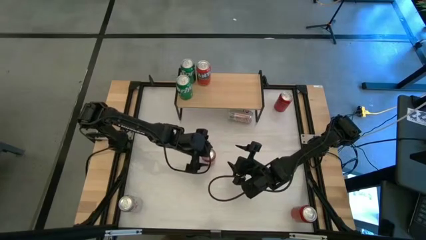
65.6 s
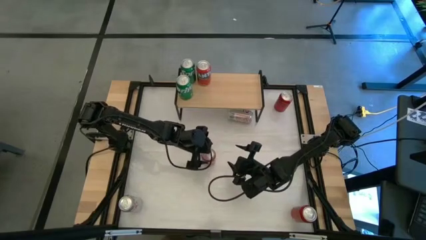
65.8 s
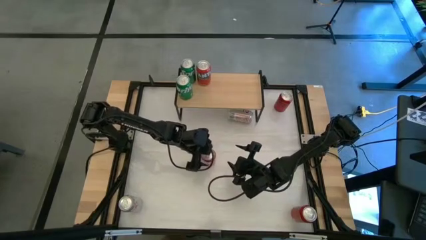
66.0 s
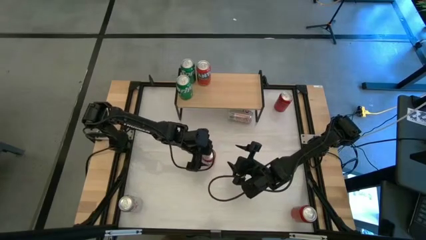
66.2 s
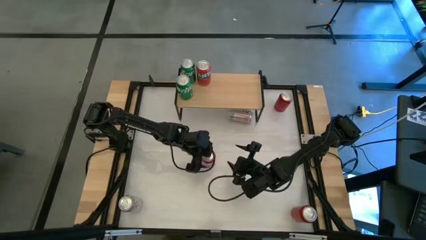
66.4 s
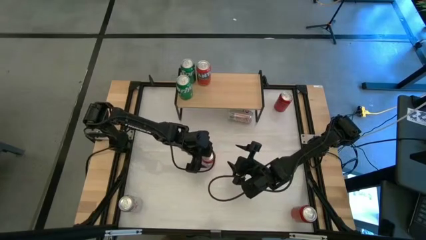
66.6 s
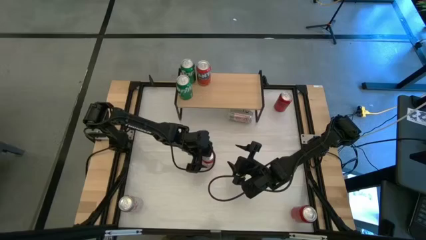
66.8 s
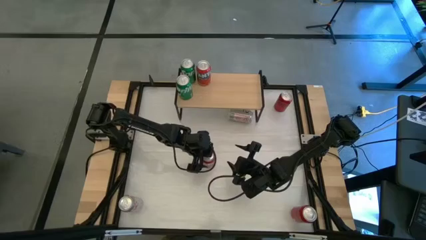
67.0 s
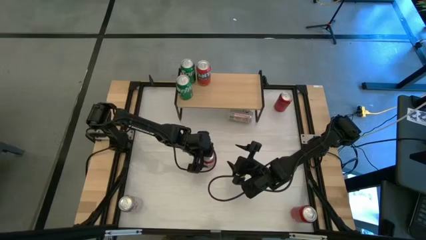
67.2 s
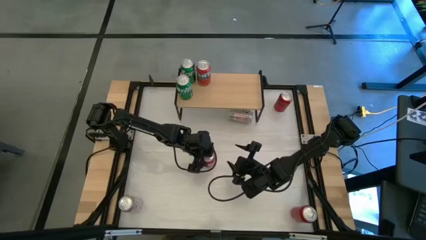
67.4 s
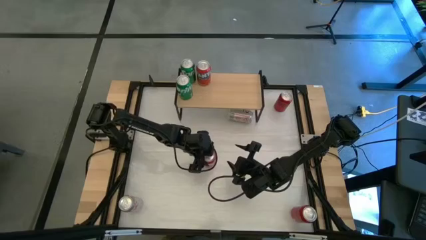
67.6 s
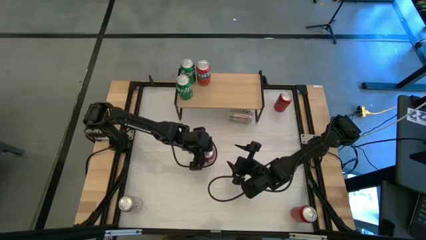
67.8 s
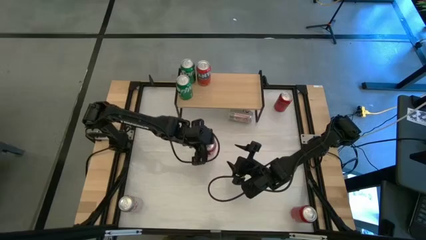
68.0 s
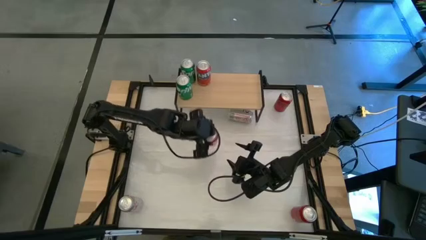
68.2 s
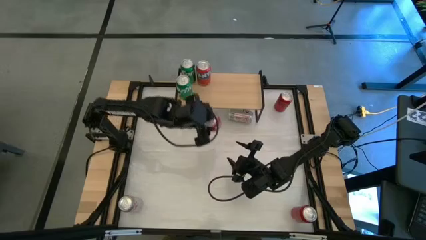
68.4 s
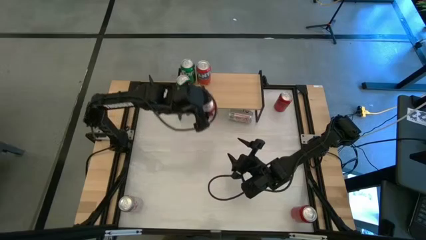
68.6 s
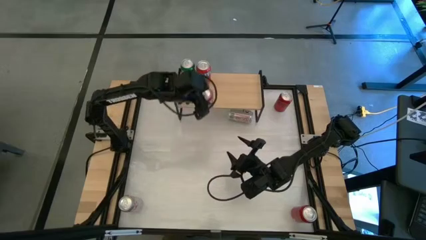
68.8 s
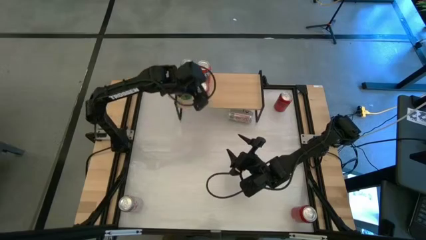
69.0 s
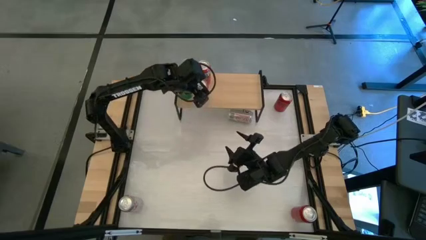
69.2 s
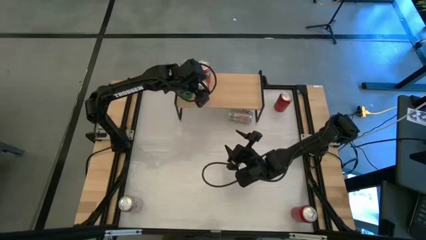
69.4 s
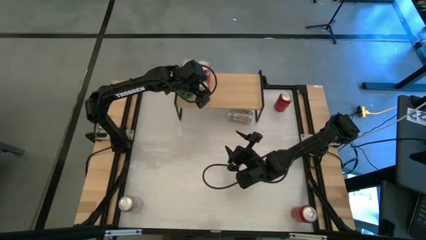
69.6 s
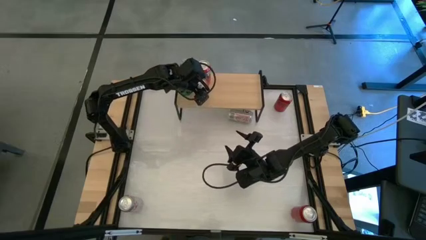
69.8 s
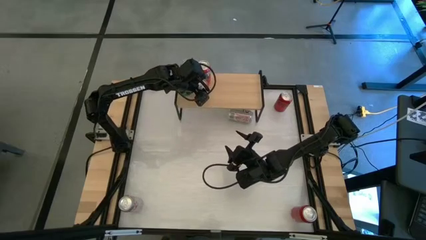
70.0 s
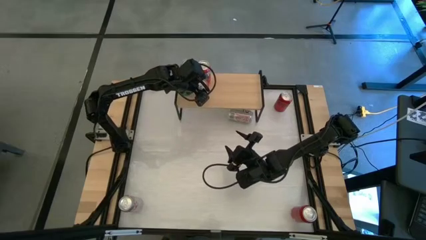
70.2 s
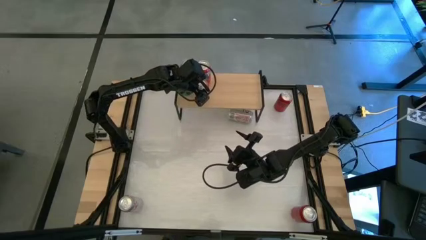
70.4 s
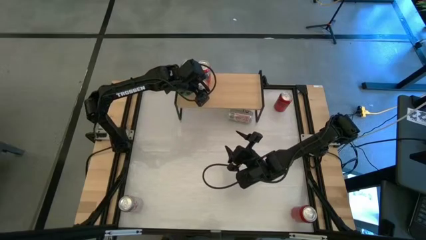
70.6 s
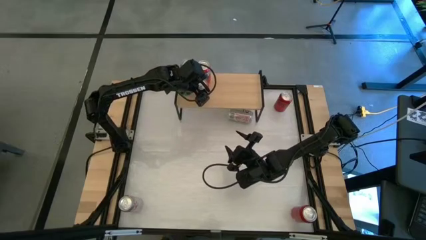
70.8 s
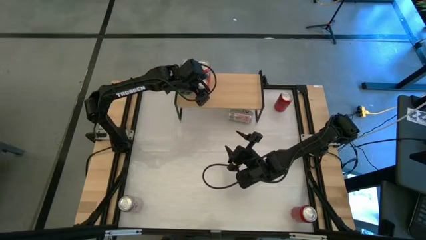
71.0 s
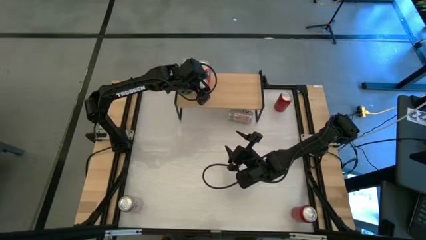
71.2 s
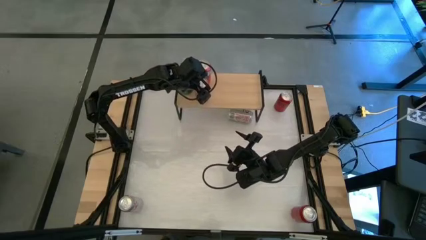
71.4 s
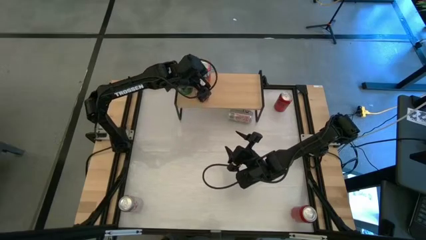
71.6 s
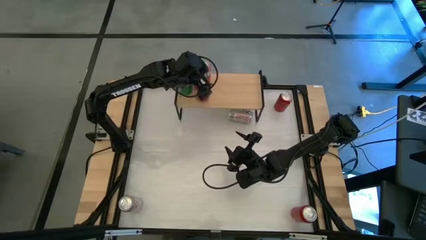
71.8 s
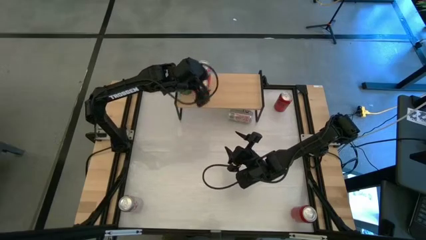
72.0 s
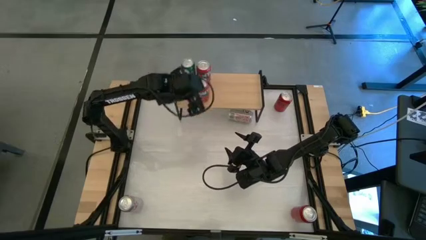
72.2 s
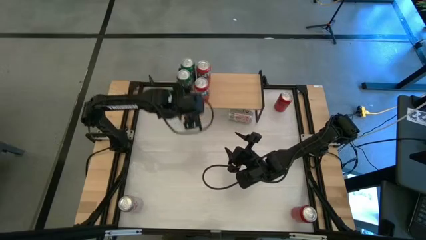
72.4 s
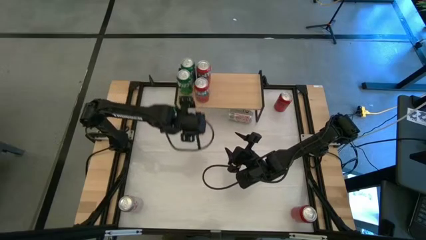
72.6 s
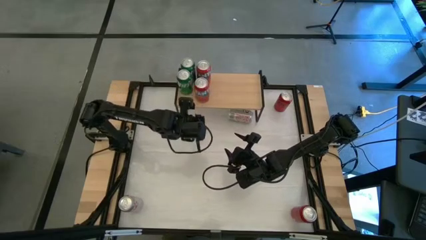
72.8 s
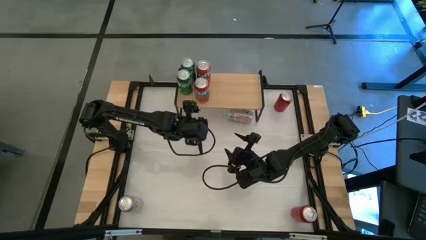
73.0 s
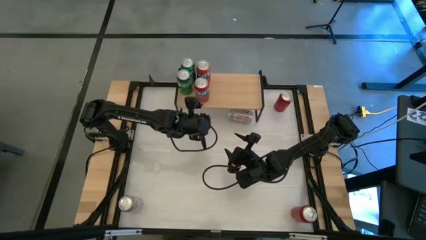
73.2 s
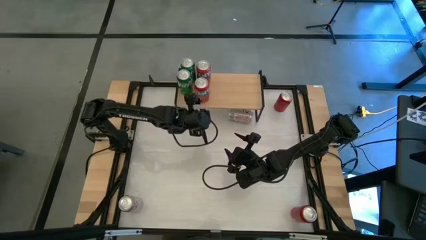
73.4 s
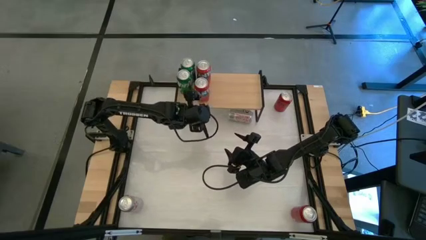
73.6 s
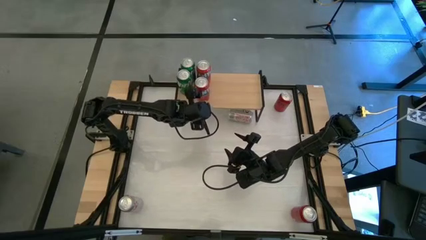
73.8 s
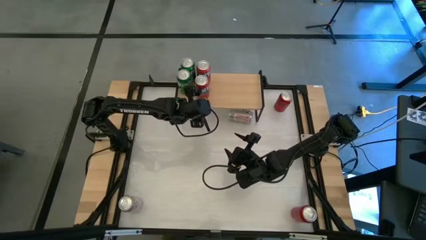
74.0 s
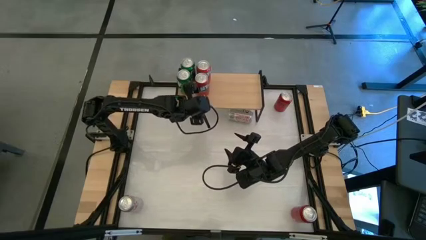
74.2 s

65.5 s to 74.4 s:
Task: Place canned beverage on shelf
Put the orange soda can on the shelf aligned with the other orange soda can

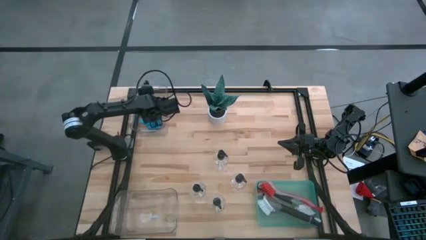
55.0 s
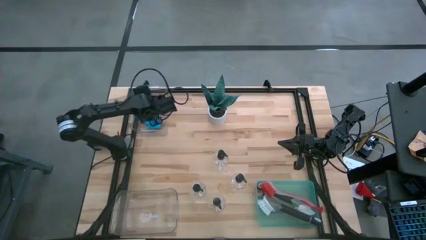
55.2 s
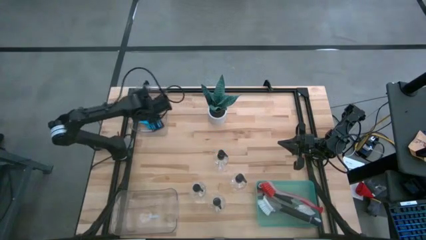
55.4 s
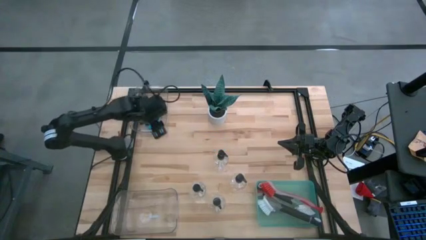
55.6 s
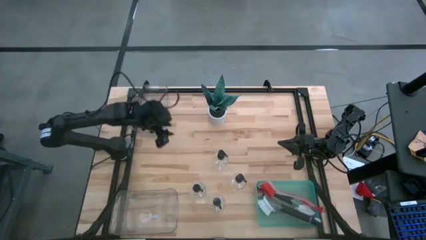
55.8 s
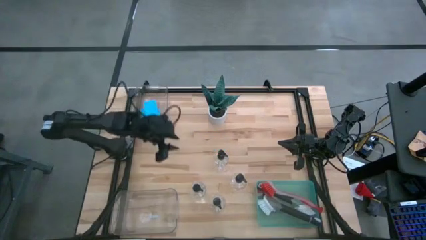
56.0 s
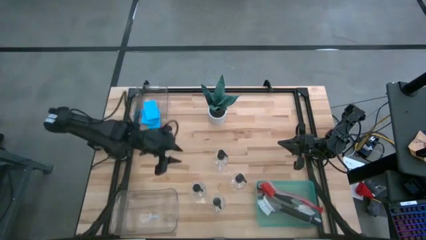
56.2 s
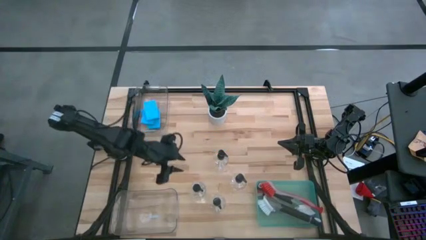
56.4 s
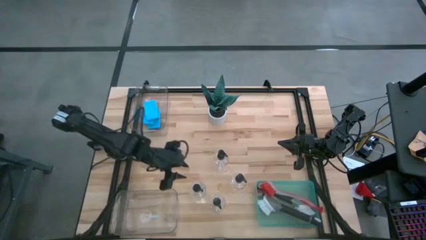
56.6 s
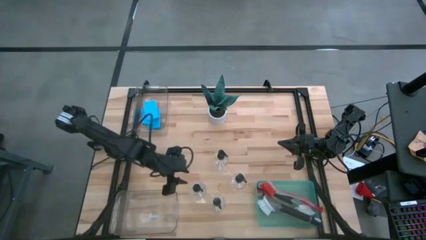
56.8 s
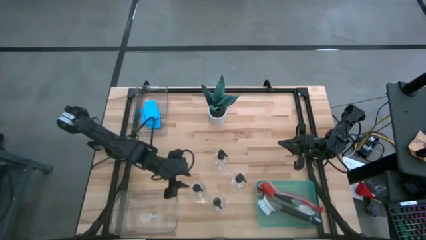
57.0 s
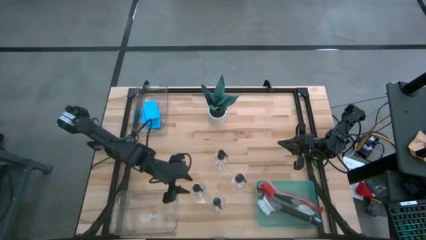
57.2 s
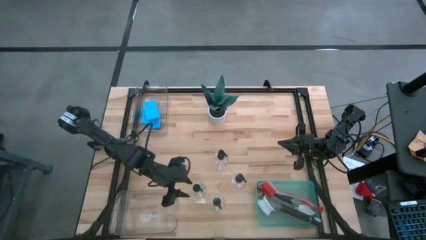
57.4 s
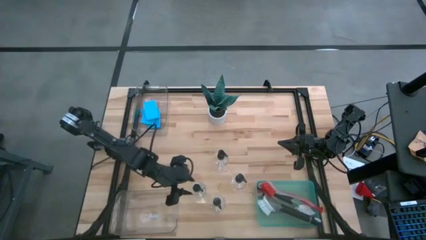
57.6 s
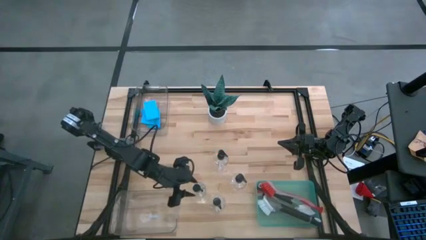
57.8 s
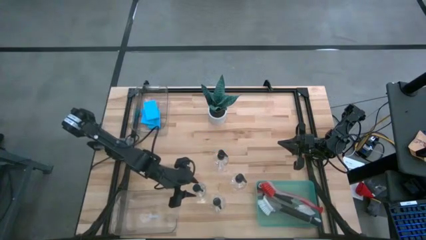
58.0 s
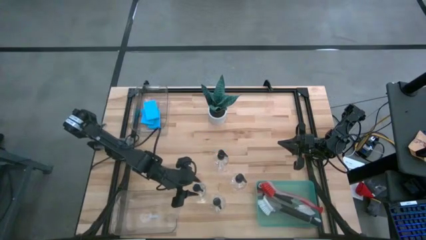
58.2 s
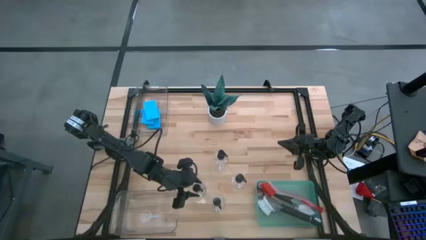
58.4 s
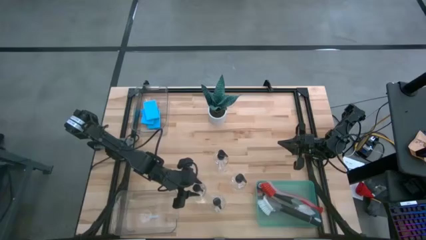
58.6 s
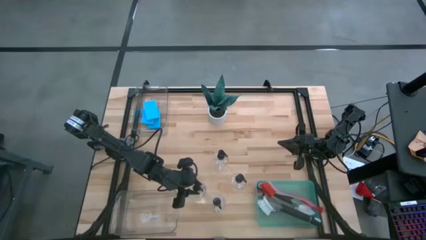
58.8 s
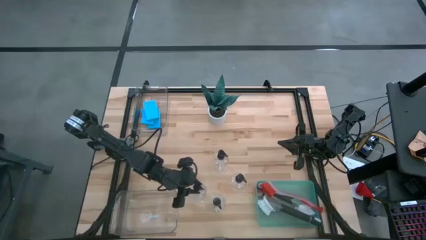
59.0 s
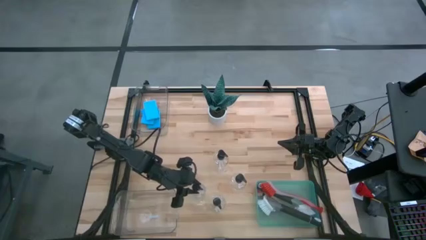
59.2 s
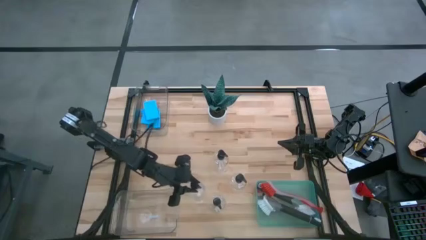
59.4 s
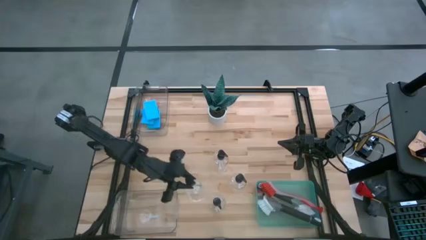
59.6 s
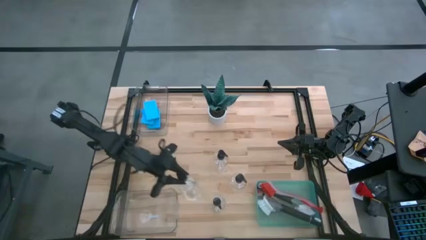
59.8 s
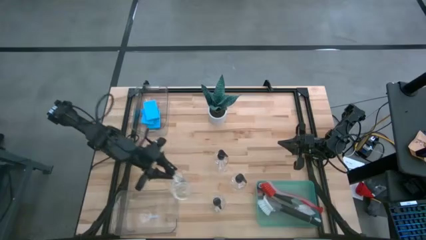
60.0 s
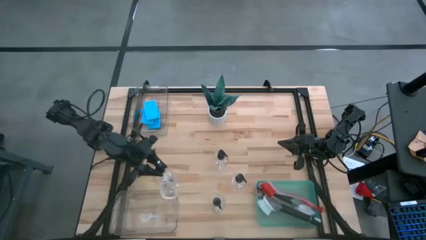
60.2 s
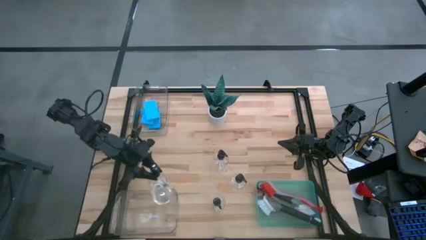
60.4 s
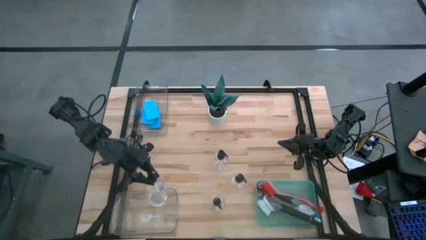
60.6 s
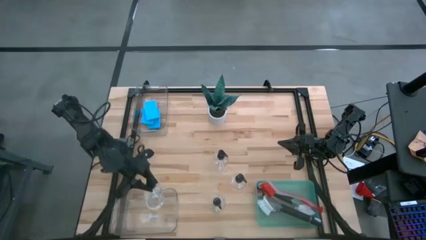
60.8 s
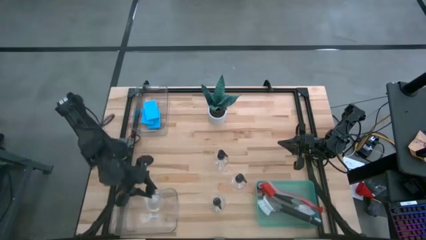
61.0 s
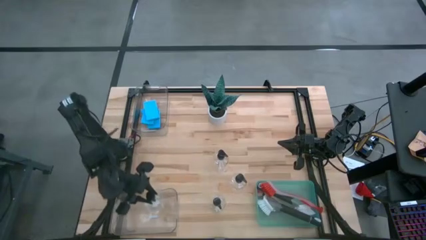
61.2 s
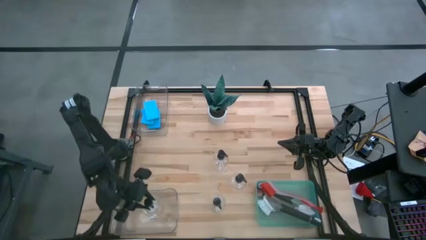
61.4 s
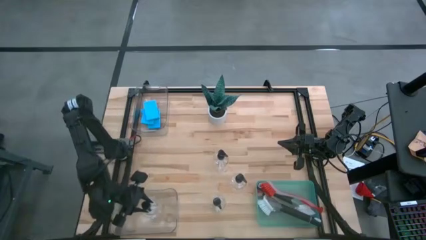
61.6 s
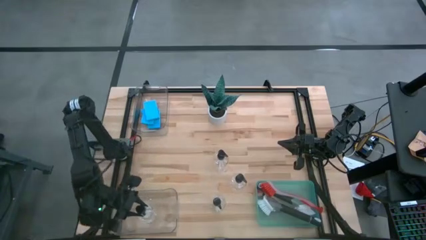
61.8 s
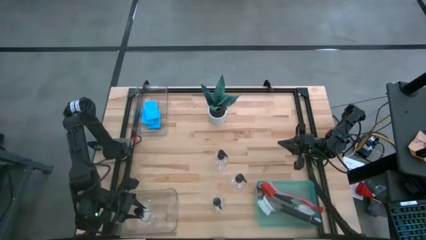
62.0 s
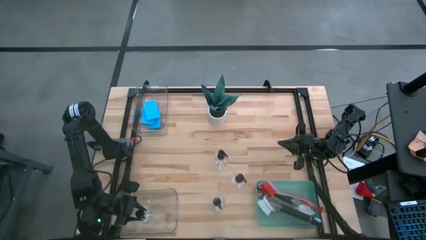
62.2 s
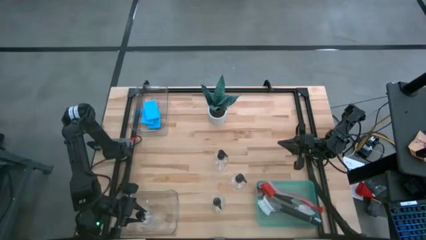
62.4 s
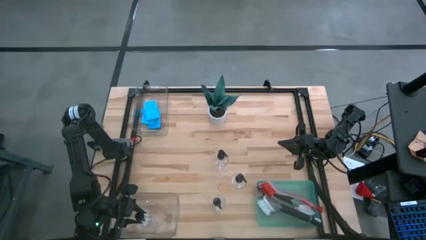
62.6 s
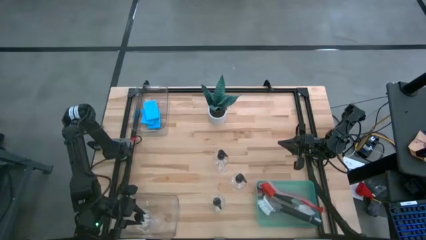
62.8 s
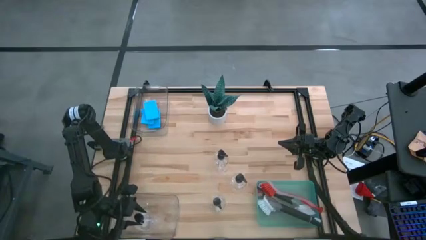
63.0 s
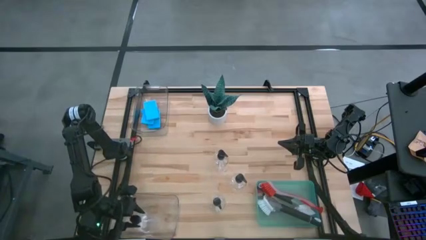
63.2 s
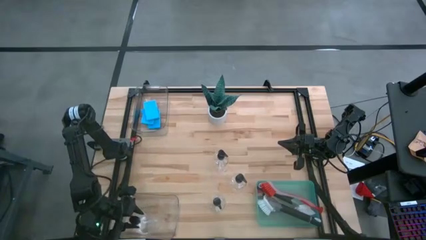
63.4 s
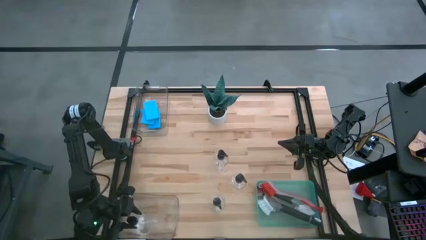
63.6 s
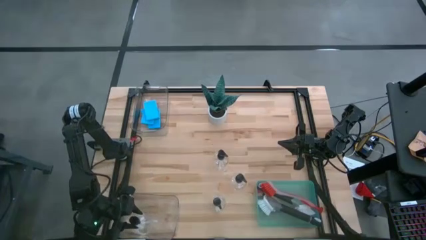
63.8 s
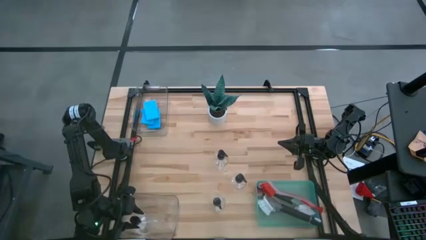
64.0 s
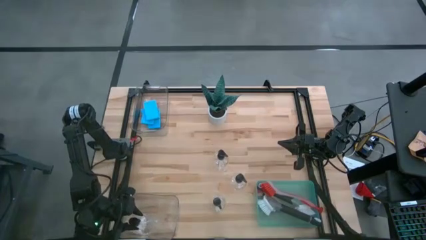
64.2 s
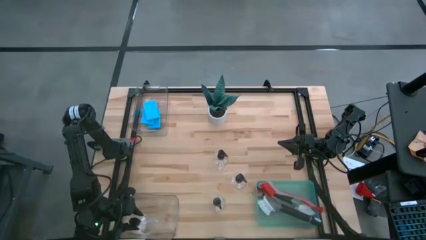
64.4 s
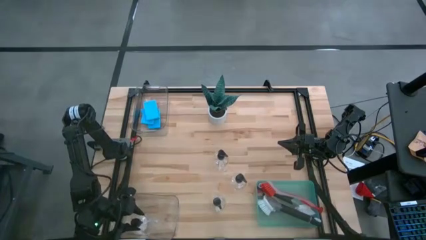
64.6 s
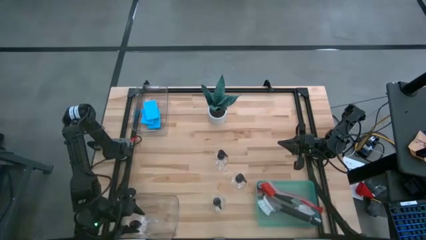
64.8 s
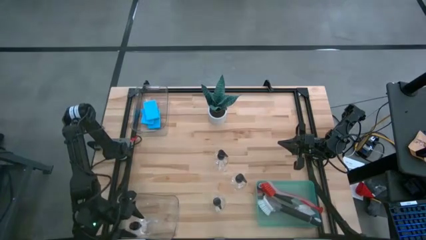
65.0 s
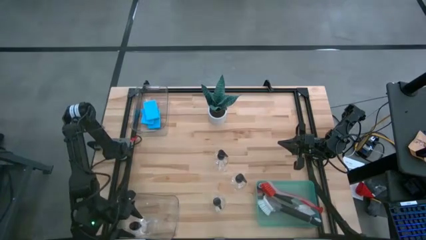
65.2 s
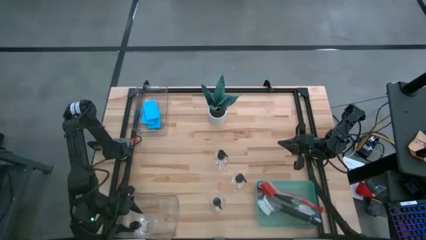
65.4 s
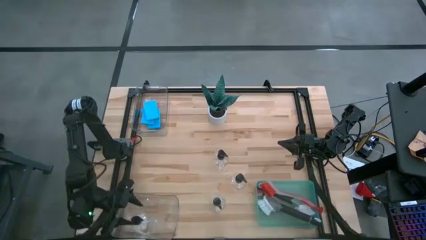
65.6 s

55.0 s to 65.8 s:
Task: Pick & Place Kitchen Sink Supplies
Put the transparent spray bottle into the bottom transparent bin
